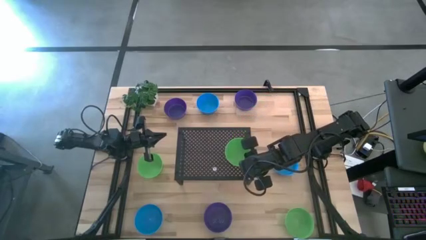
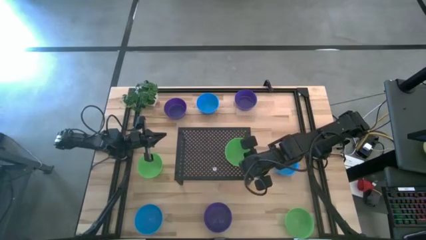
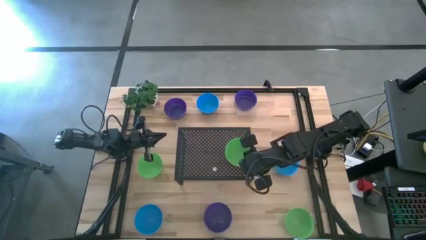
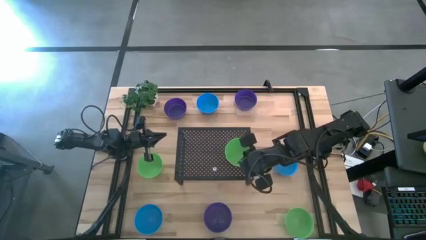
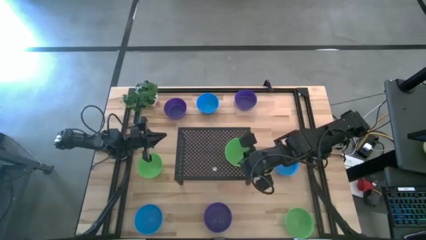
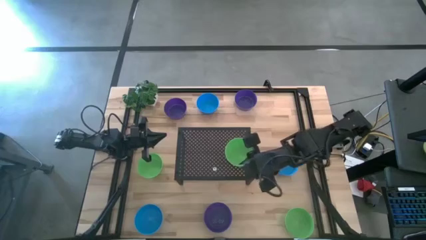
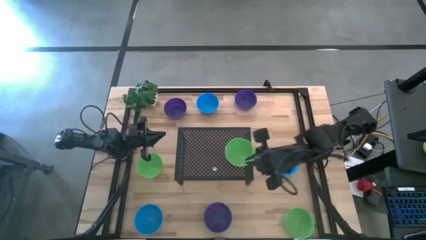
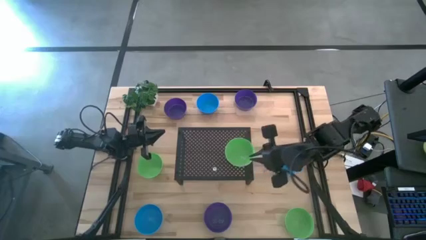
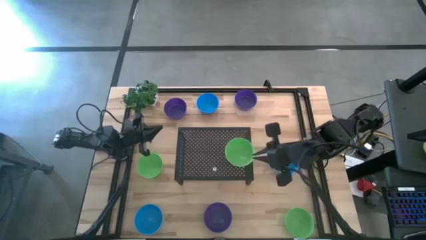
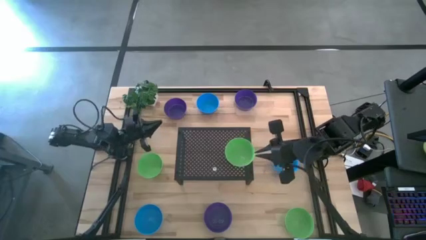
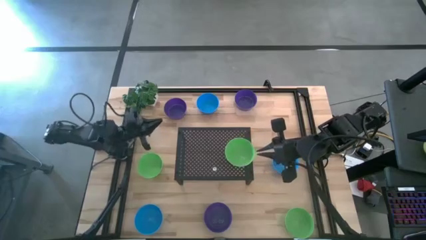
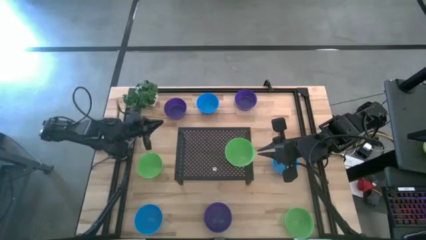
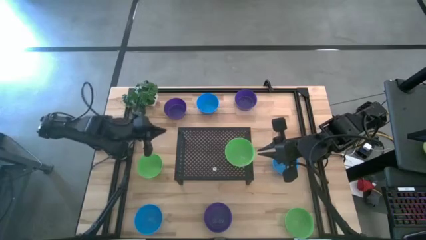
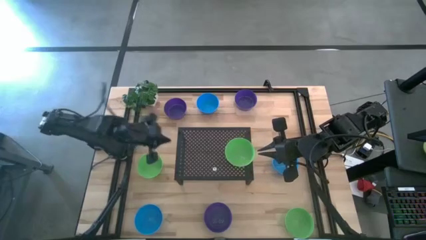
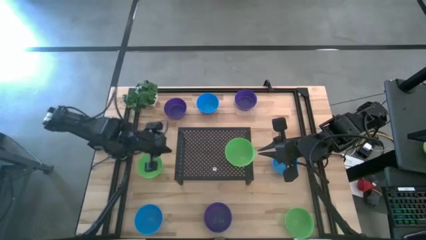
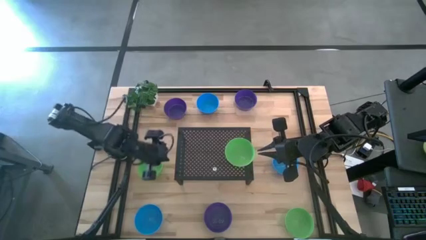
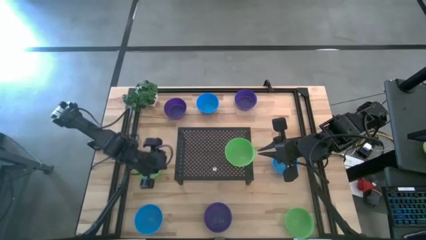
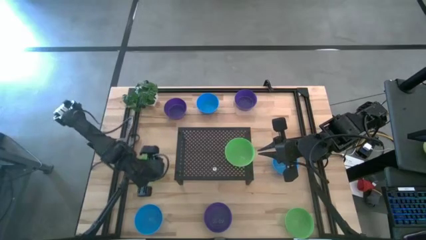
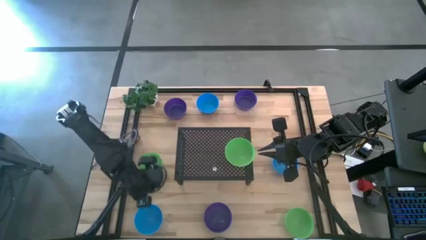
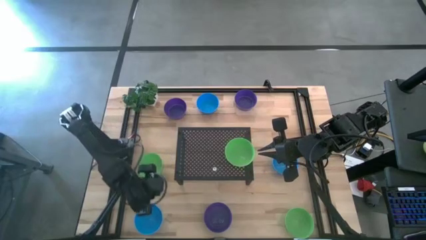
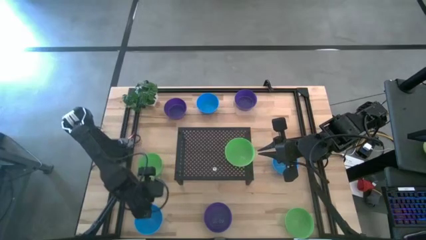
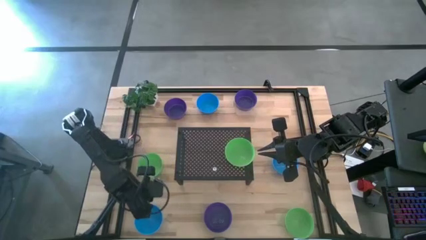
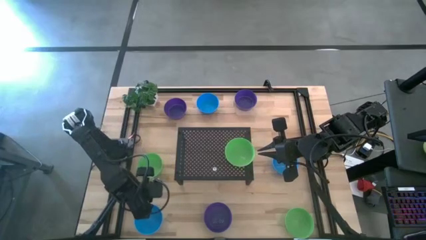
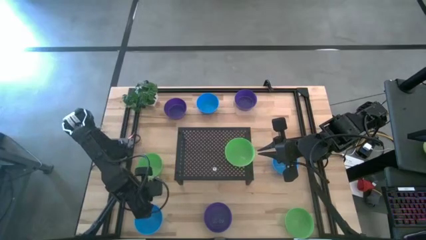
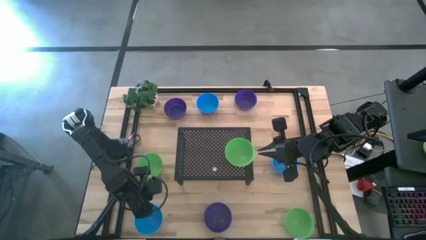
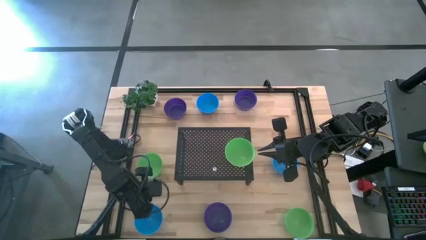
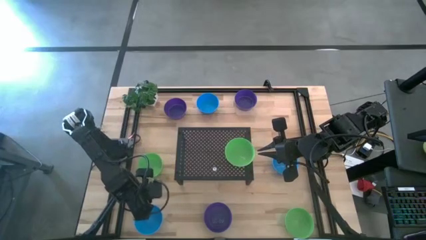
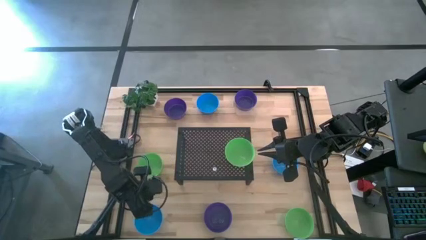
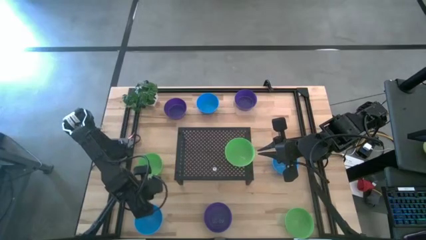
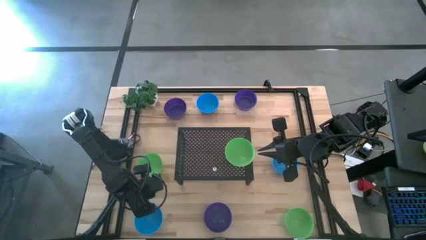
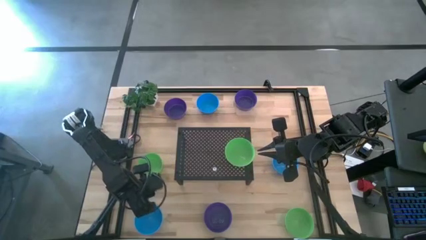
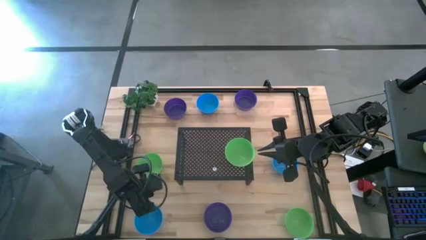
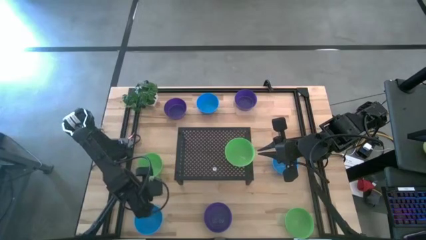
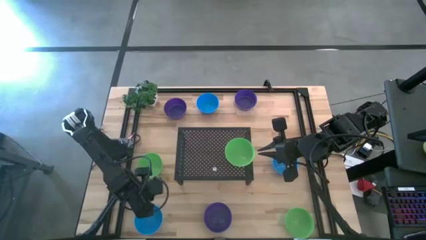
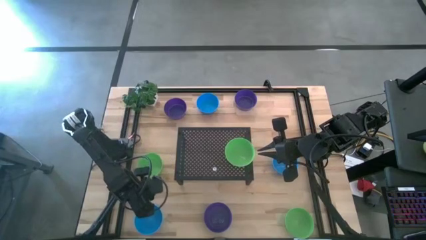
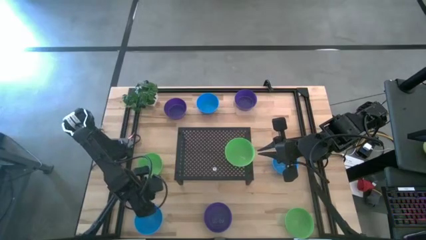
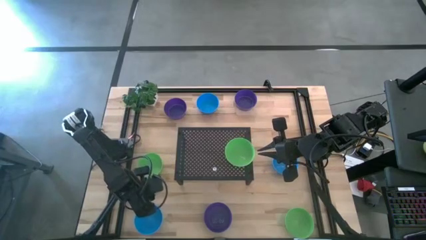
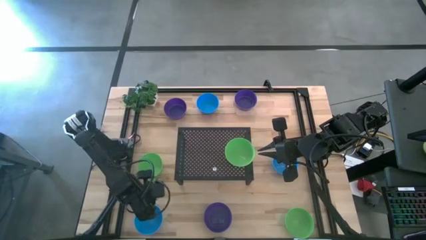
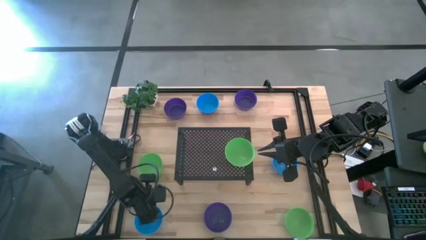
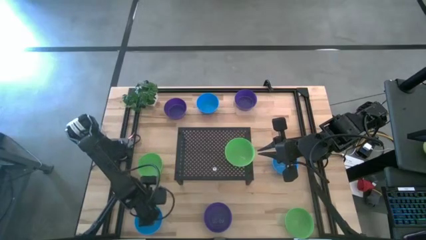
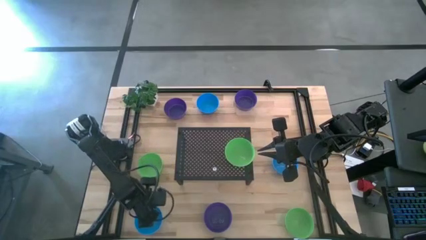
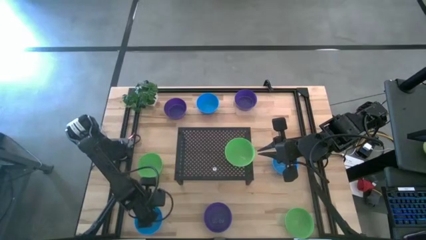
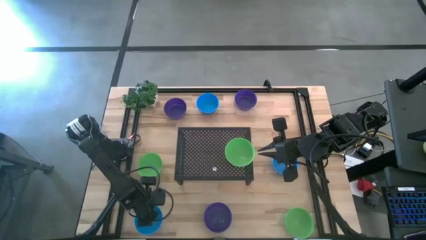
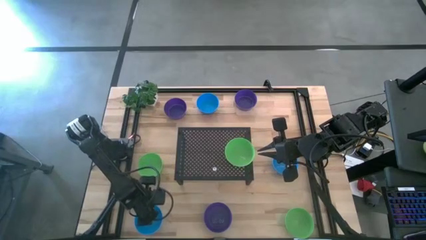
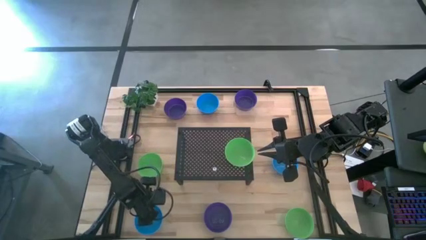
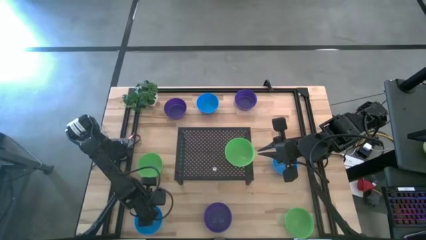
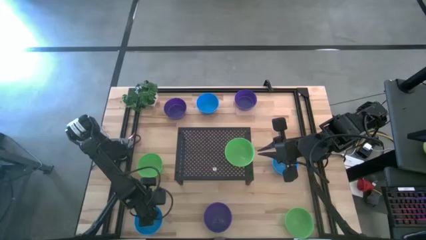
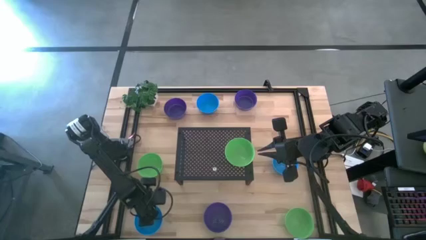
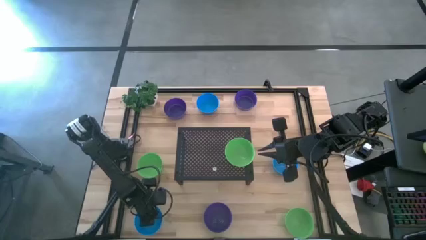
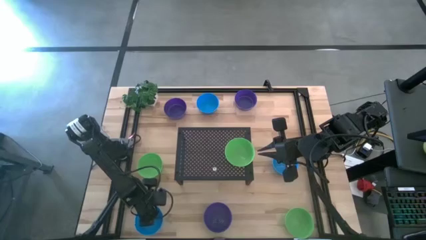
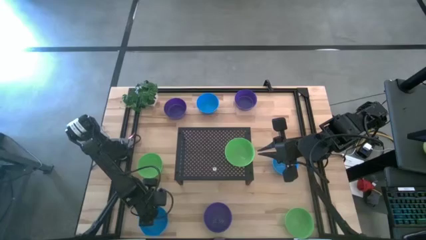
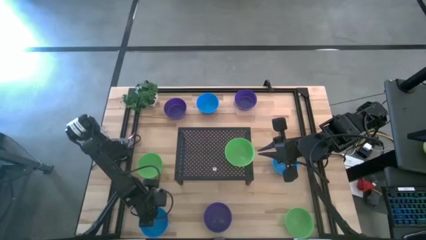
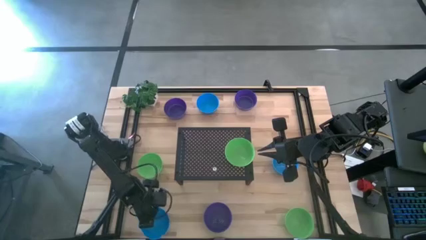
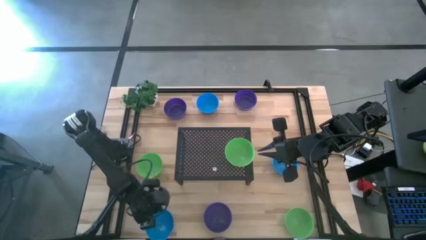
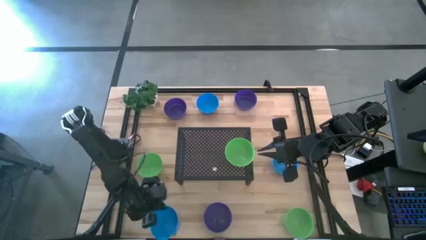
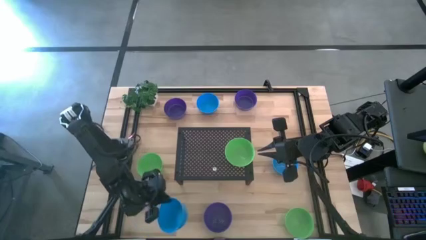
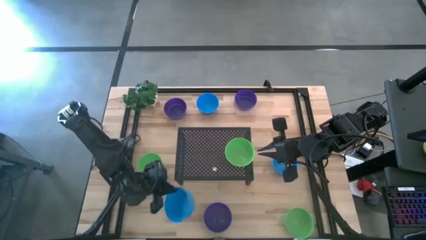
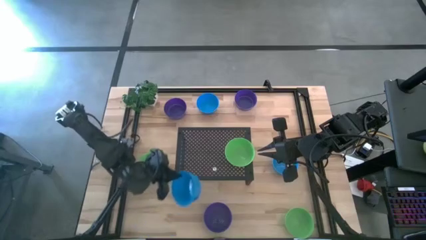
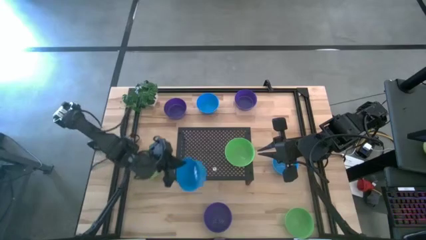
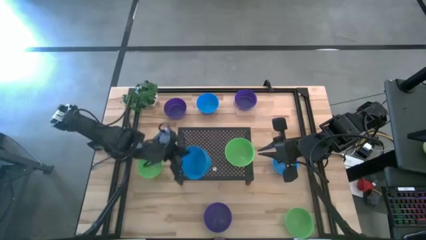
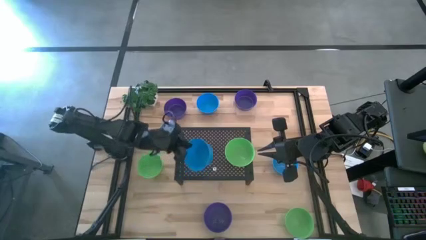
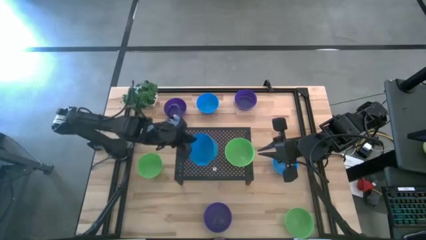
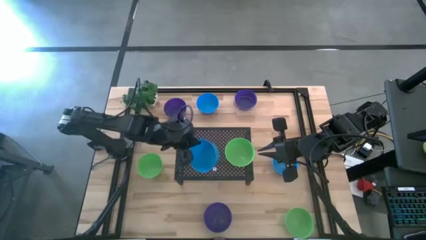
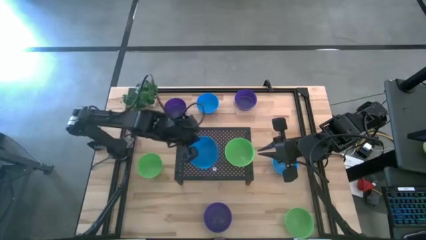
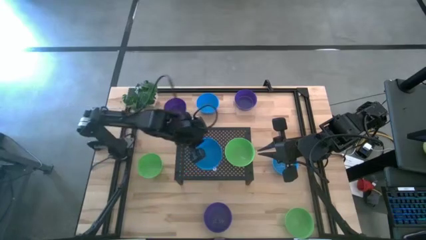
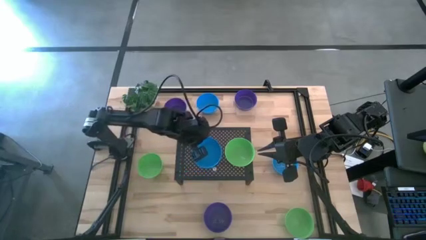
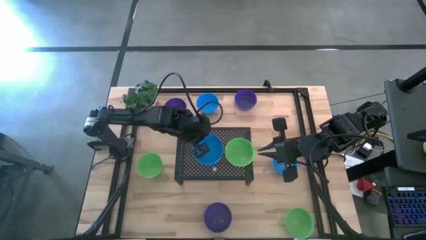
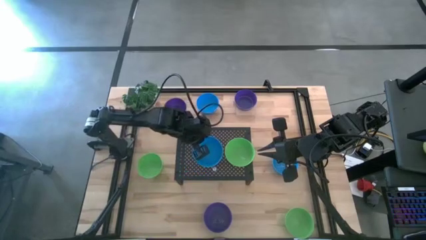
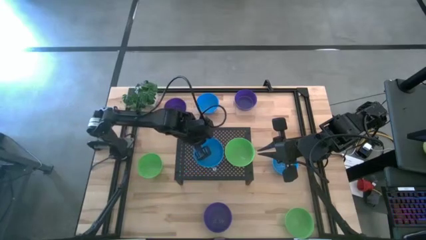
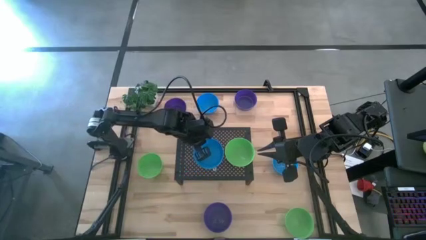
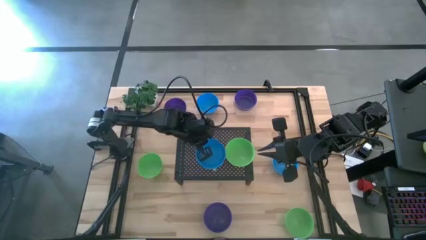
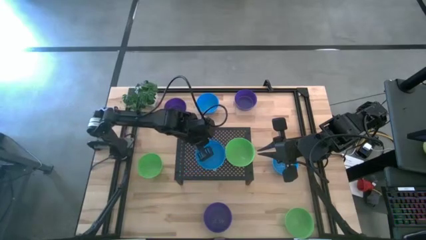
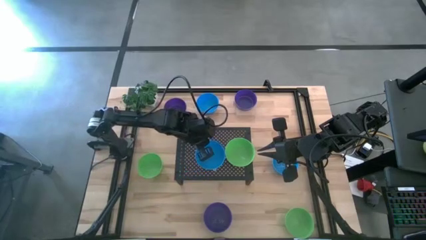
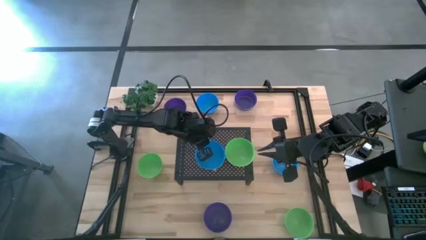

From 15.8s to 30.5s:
Task: Pick & Place Mini bowls
Put the bottom left blue bowl on the shelf
